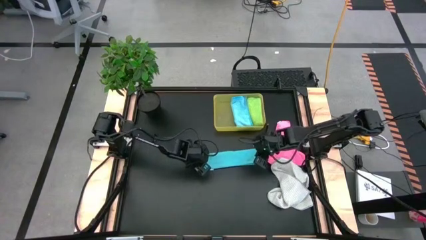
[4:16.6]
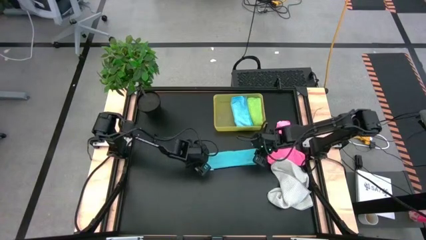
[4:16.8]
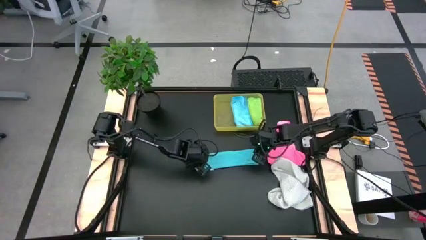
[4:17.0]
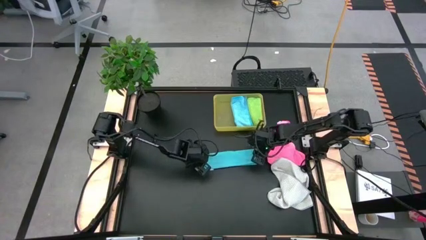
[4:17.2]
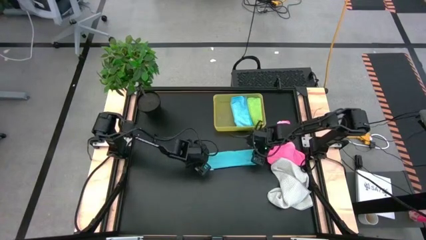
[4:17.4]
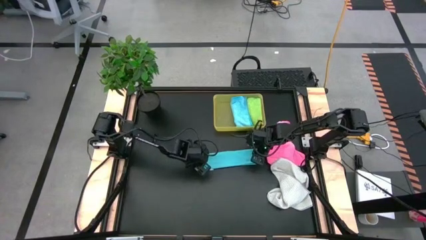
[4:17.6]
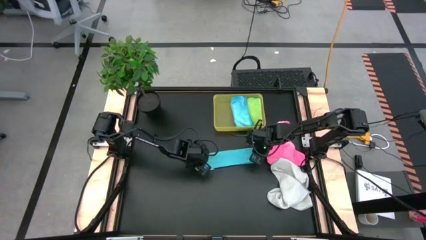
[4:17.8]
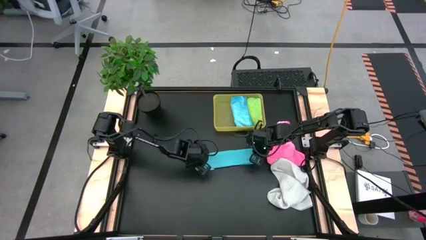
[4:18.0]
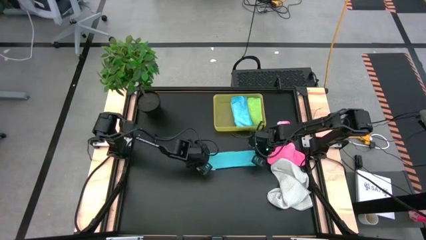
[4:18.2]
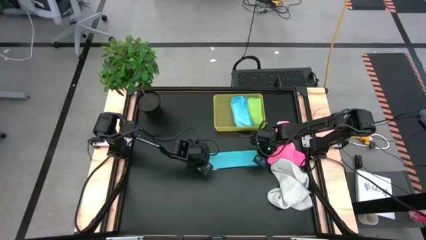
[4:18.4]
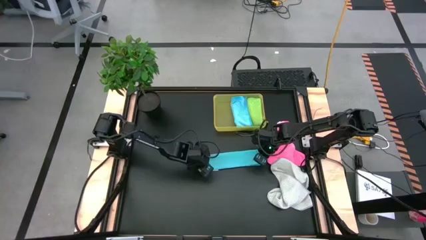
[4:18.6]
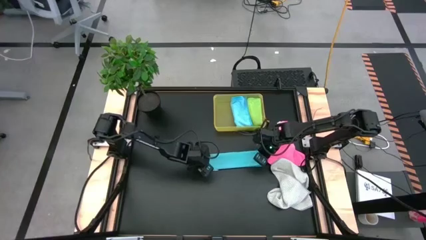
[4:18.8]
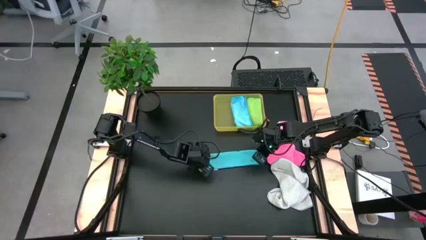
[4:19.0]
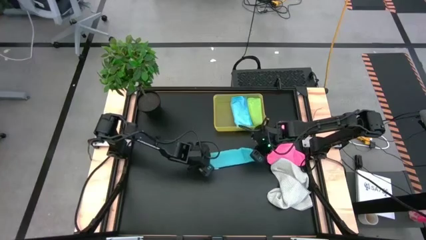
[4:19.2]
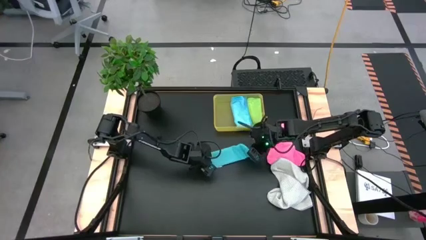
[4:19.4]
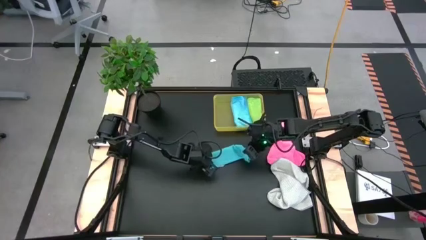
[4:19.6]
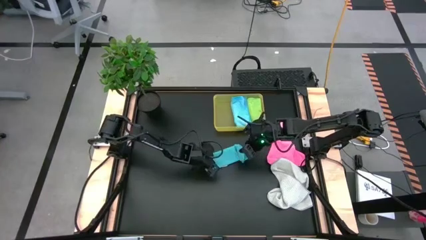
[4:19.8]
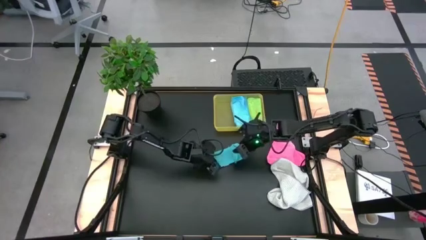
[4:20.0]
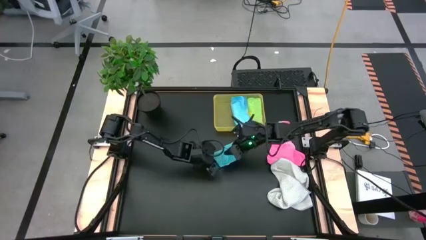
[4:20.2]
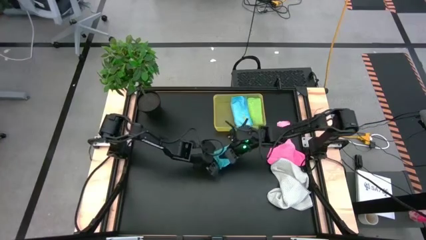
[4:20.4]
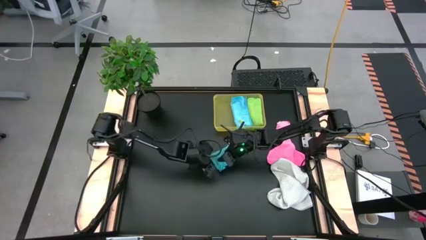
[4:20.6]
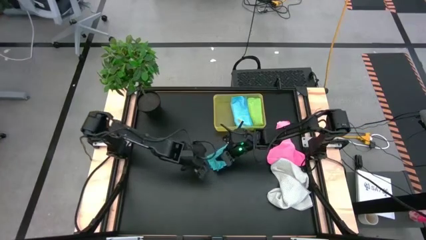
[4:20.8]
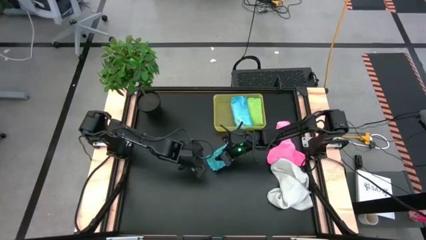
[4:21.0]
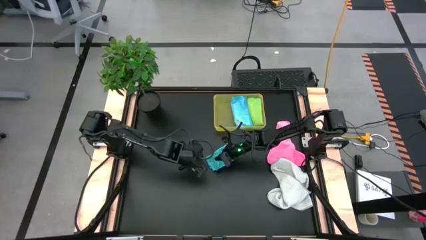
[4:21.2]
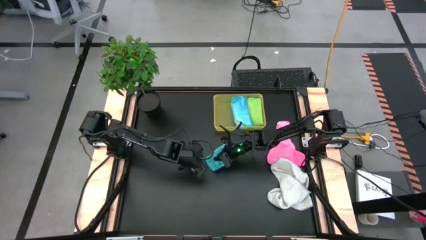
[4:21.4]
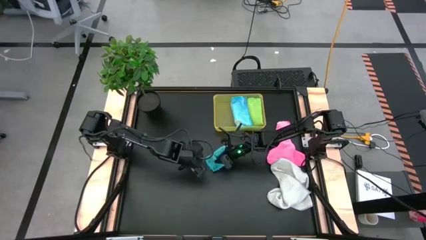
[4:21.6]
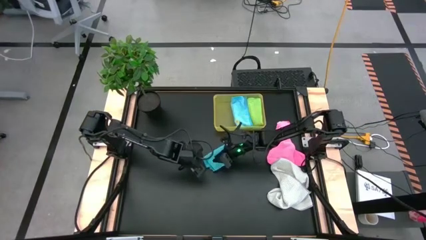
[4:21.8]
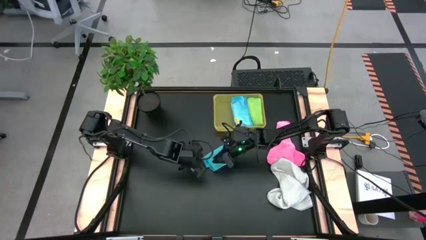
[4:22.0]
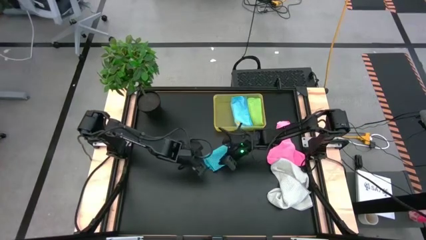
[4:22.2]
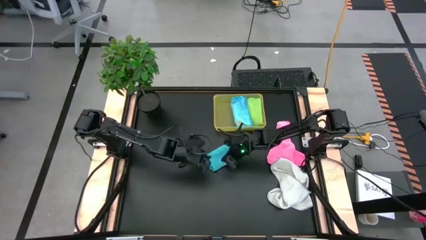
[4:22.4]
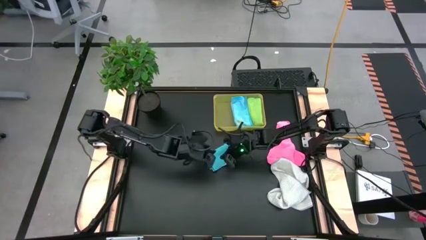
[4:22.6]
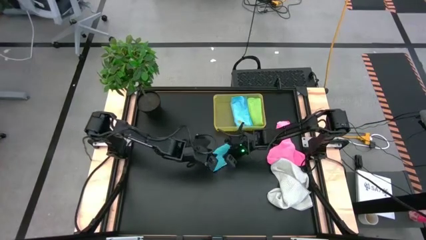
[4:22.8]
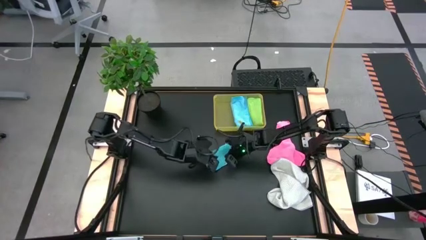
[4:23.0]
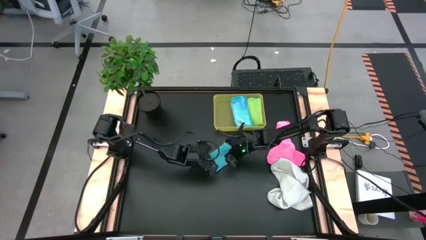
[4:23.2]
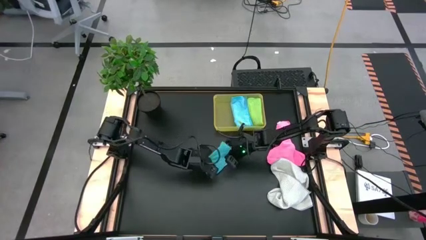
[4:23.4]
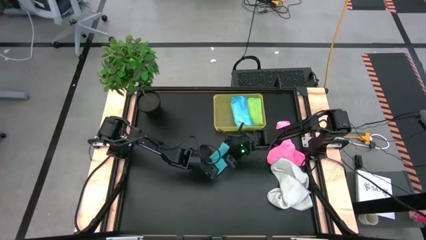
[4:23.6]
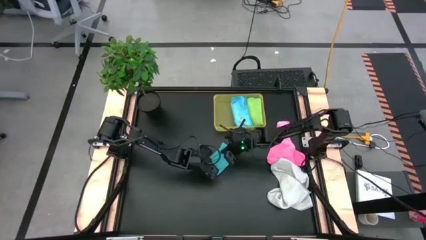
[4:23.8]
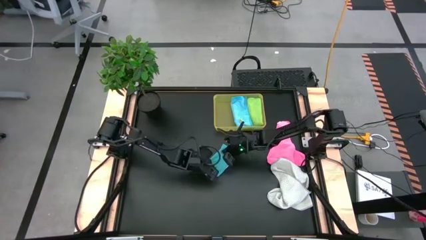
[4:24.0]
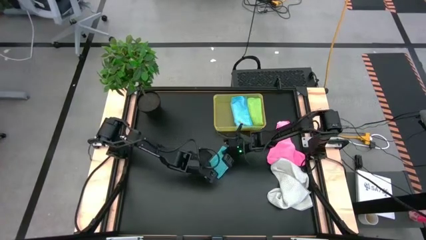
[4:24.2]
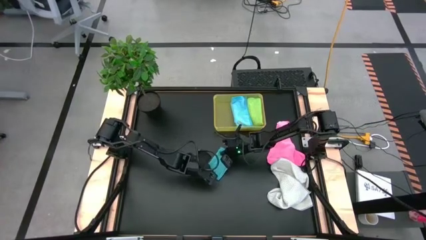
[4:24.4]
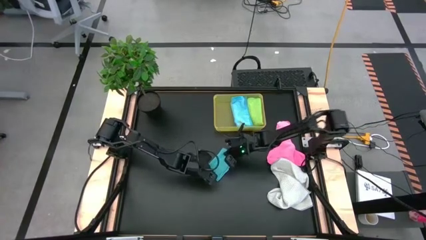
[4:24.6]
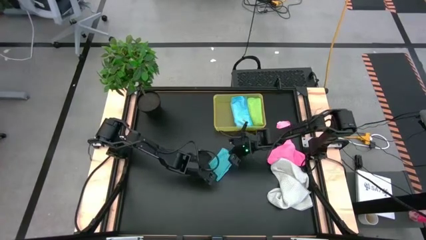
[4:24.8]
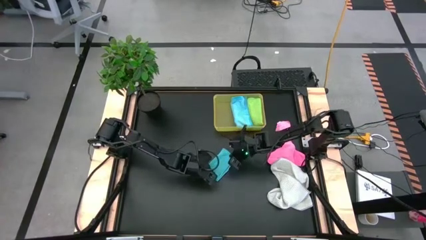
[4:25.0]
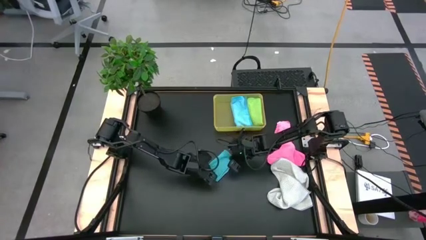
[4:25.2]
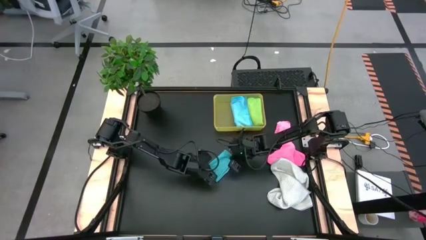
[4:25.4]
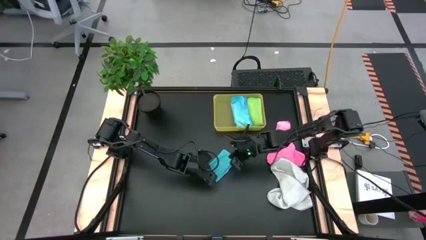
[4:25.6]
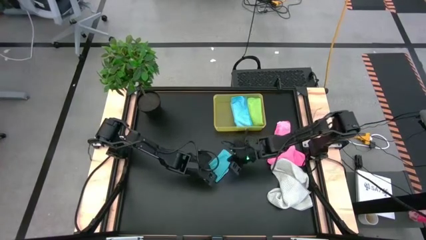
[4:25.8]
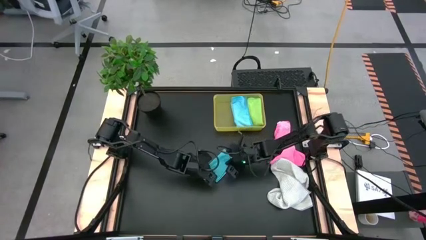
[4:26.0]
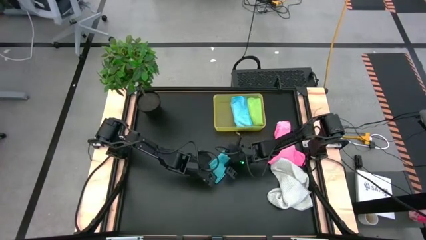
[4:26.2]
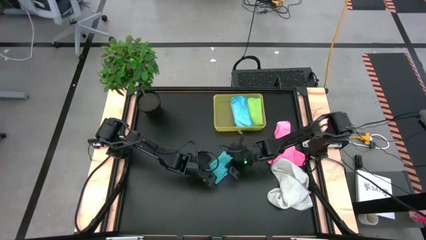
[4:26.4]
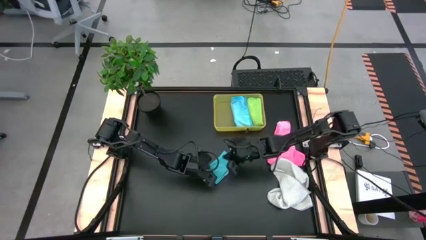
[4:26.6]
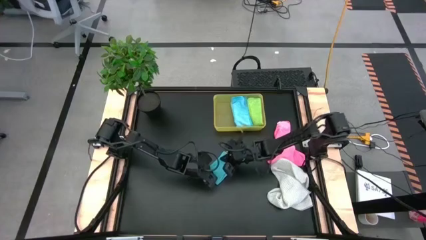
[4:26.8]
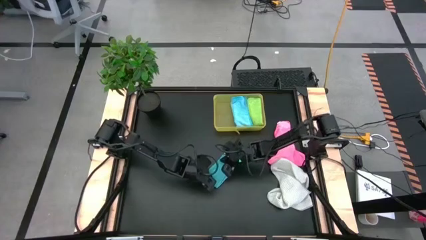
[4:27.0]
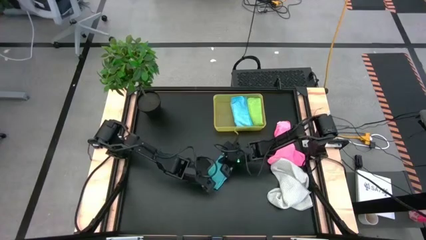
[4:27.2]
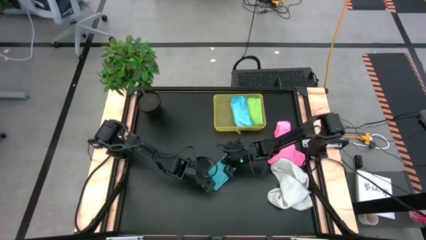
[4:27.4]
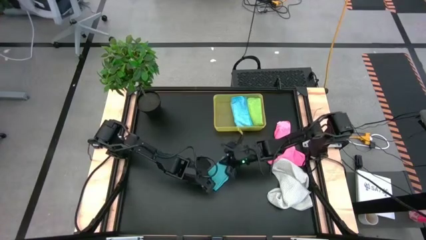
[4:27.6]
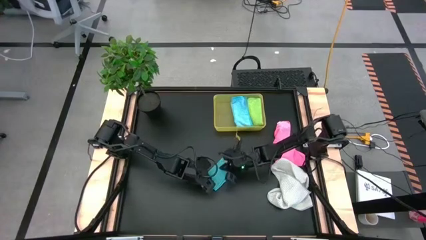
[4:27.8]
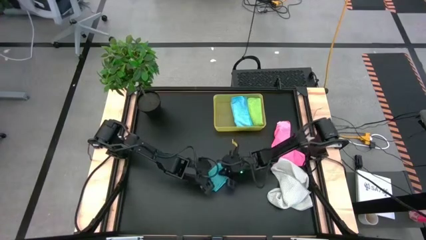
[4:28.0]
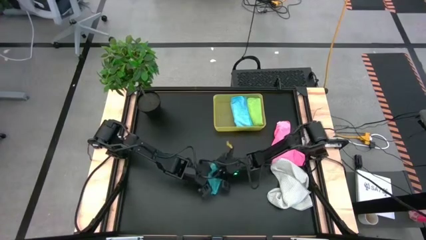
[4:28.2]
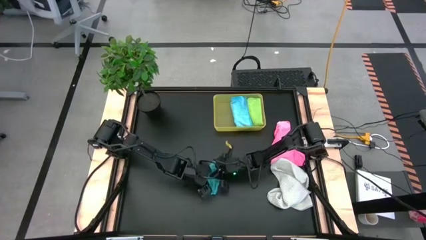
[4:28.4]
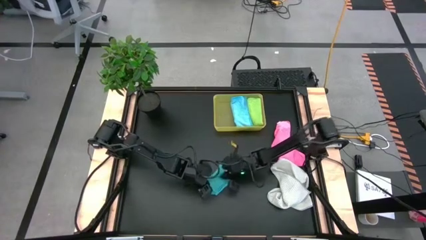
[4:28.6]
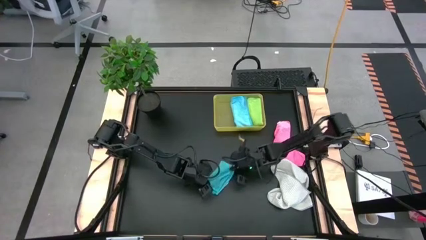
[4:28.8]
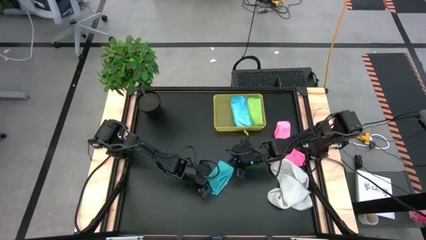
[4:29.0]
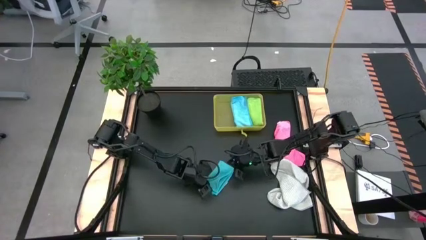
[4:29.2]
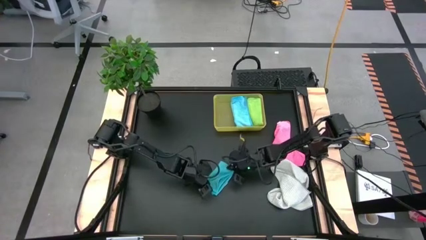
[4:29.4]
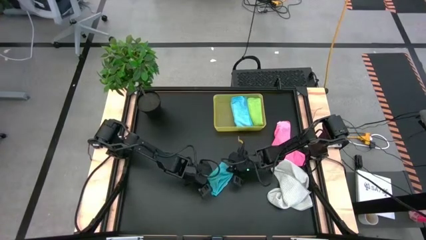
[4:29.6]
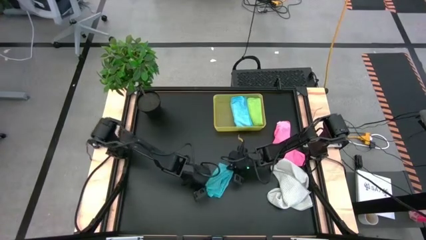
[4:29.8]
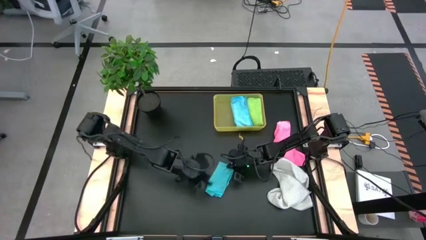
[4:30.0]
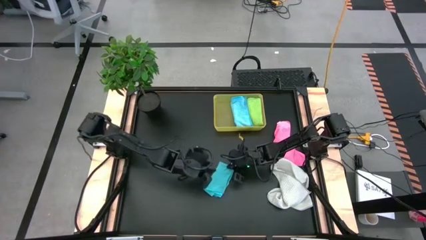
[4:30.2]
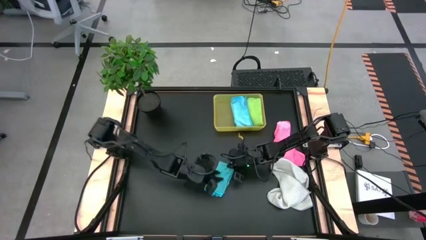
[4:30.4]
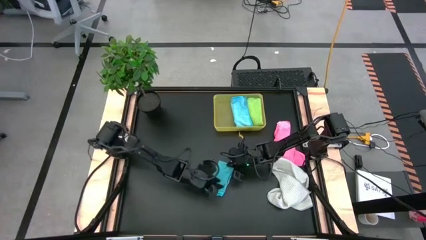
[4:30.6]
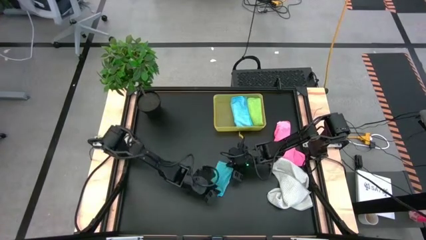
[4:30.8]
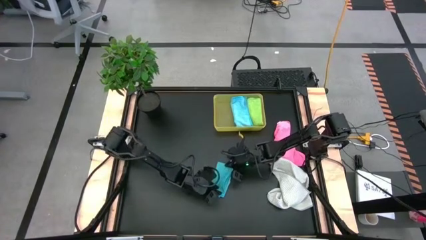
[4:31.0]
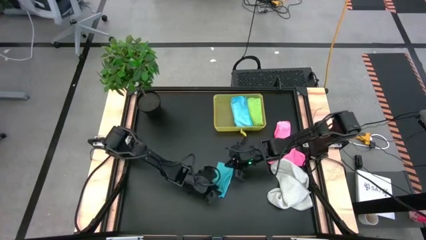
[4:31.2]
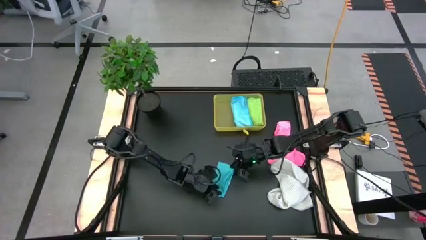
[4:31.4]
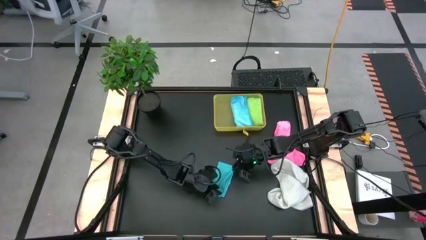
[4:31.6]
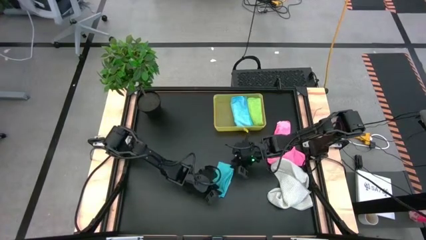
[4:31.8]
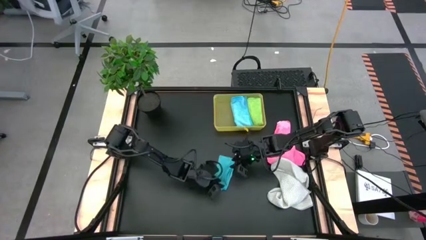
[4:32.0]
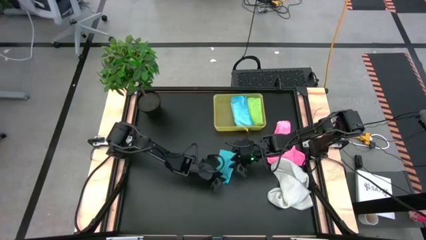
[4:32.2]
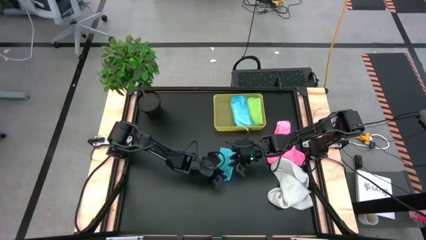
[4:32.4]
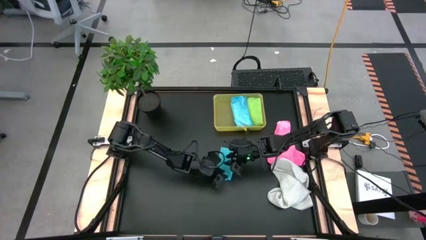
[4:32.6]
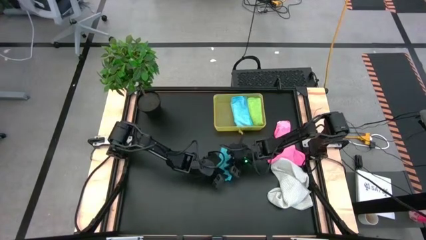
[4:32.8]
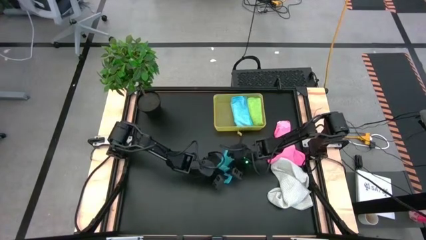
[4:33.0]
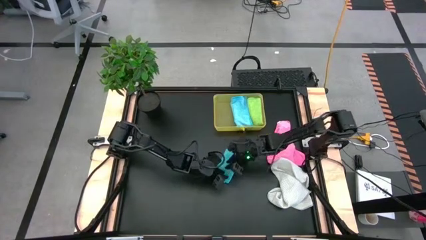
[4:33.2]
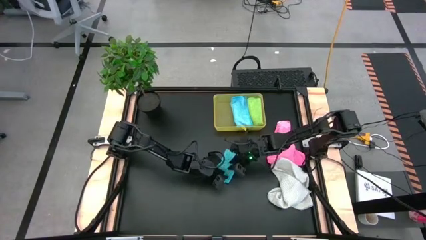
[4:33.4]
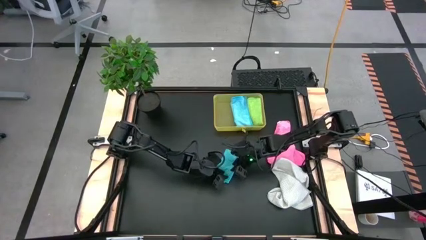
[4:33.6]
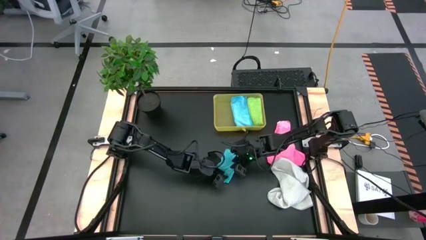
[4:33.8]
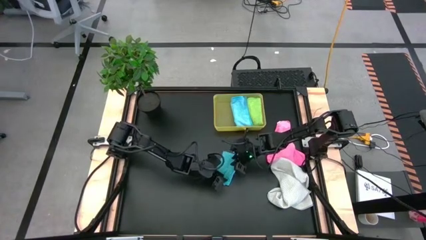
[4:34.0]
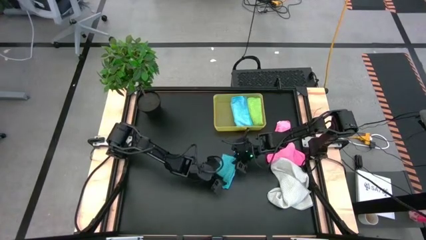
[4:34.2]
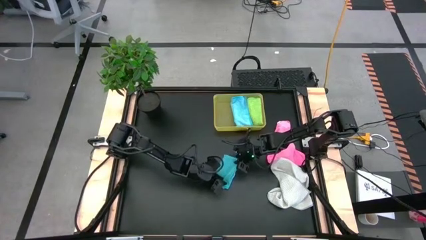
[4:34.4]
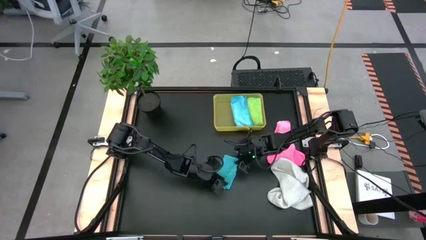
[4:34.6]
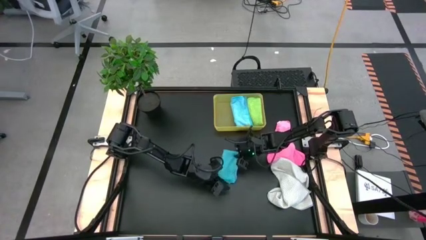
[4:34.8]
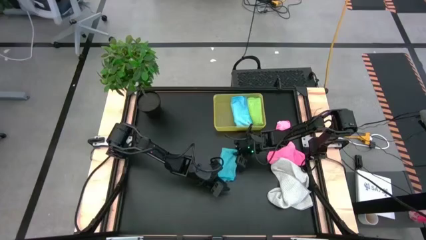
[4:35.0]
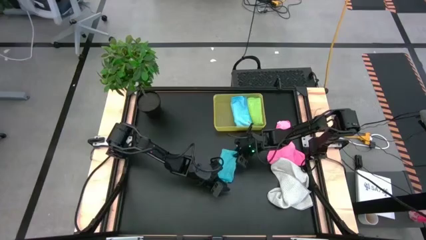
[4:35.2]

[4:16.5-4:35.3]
Task: Fold microfiber towels
Fold the blue microfiber cloth
